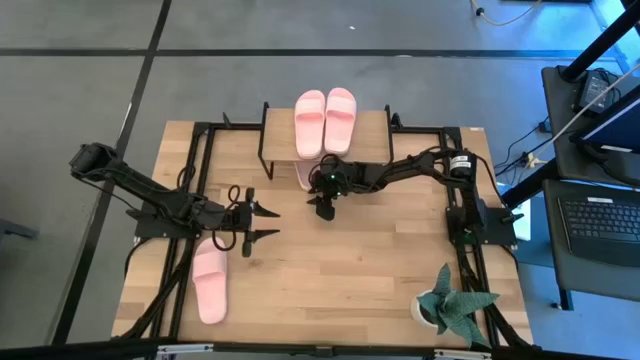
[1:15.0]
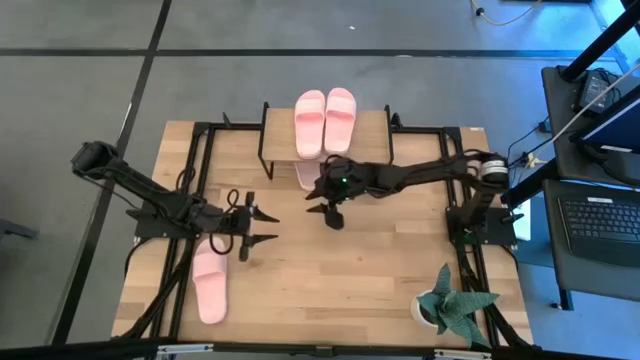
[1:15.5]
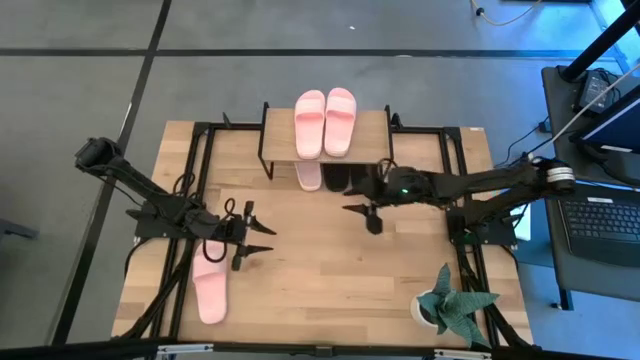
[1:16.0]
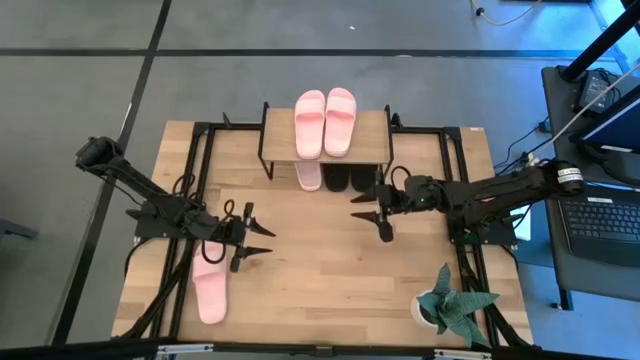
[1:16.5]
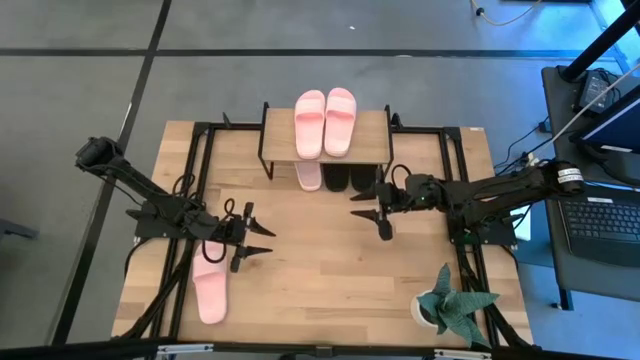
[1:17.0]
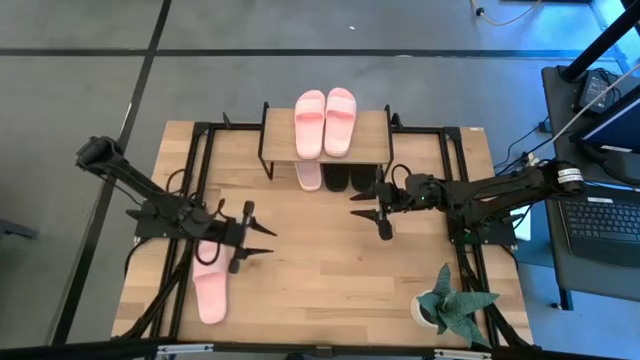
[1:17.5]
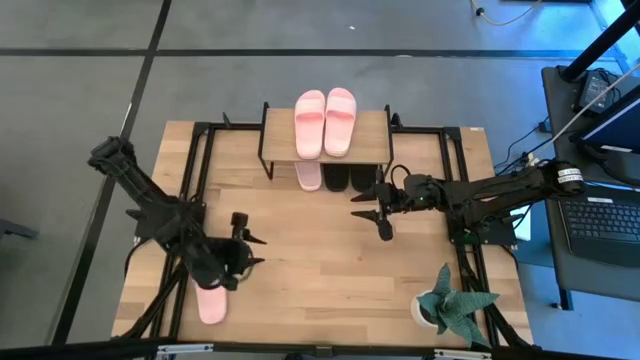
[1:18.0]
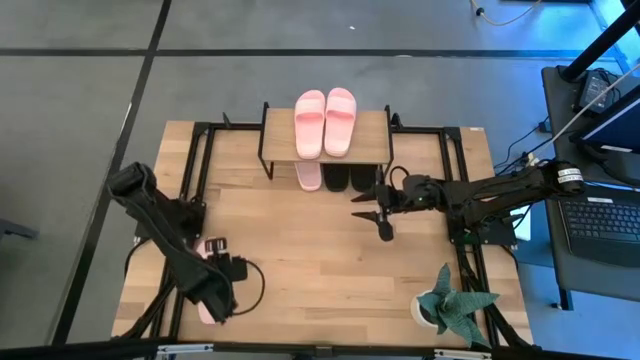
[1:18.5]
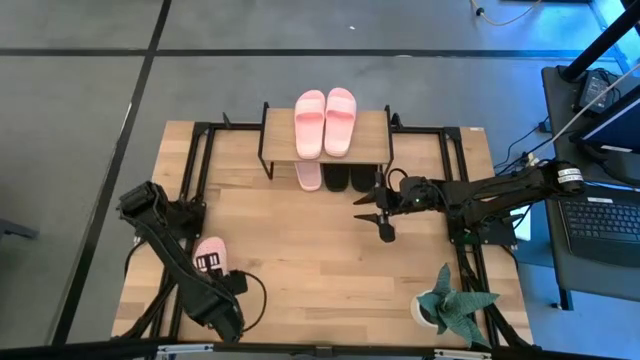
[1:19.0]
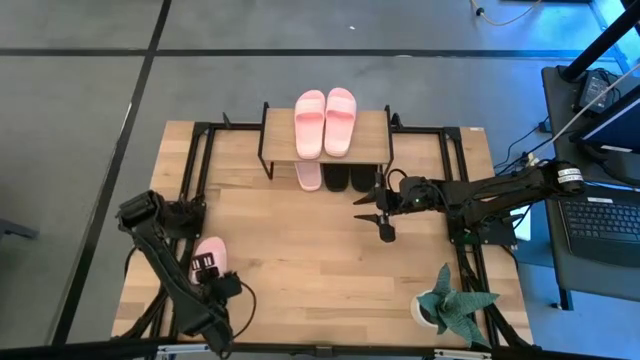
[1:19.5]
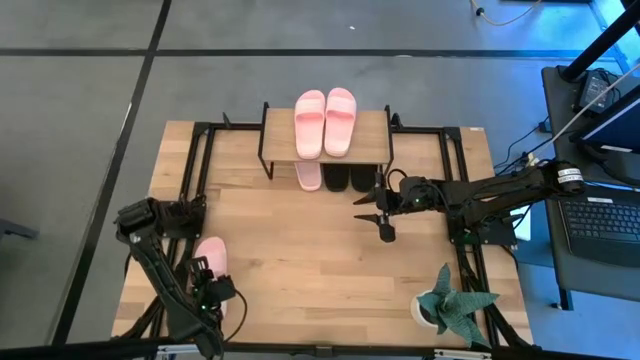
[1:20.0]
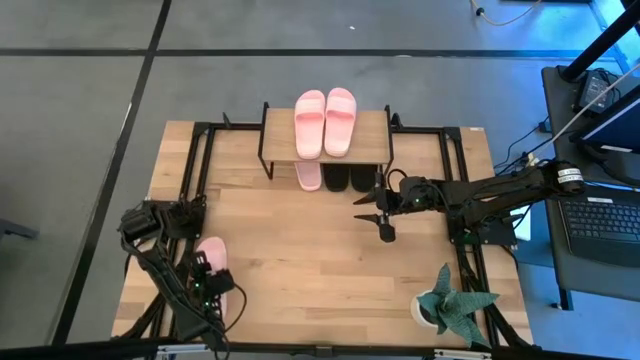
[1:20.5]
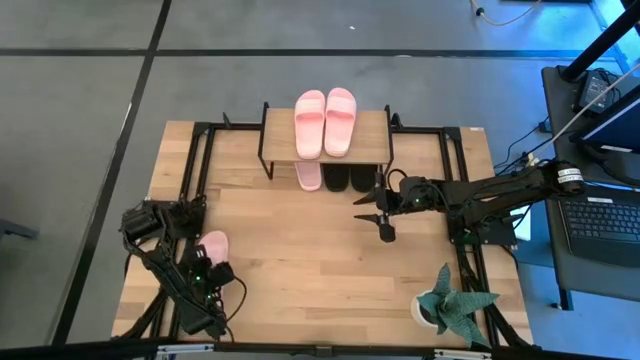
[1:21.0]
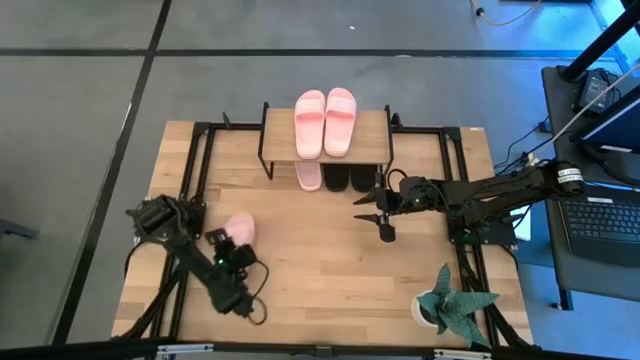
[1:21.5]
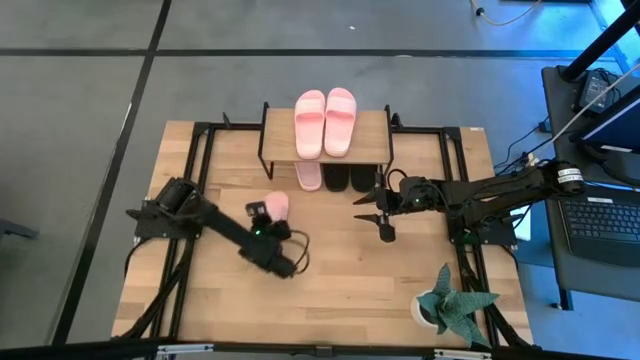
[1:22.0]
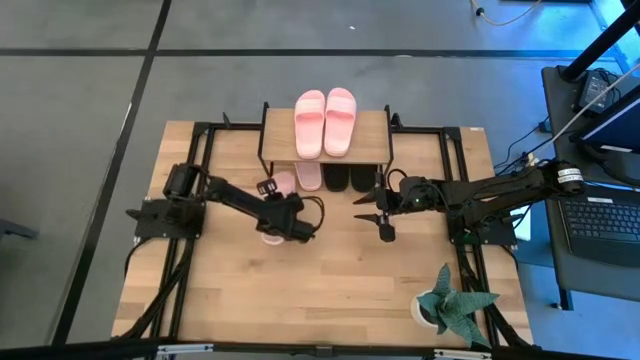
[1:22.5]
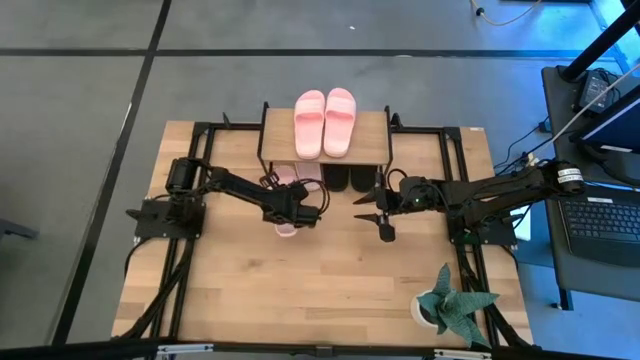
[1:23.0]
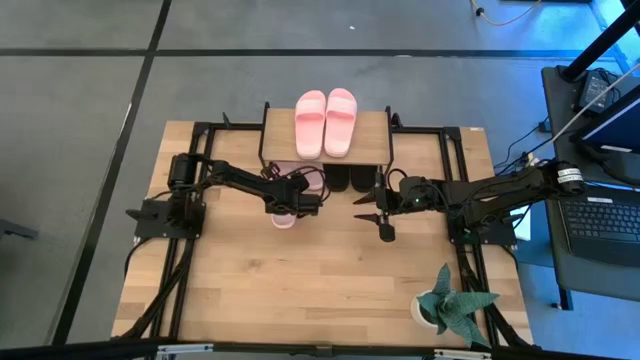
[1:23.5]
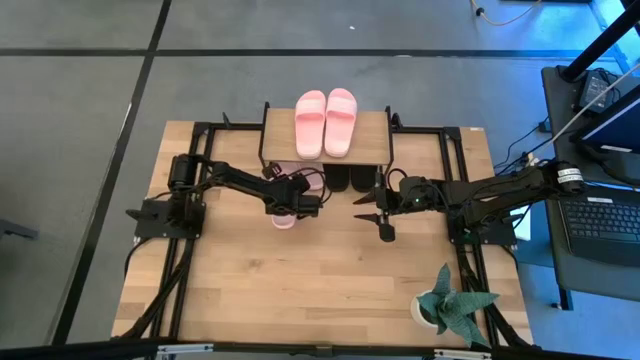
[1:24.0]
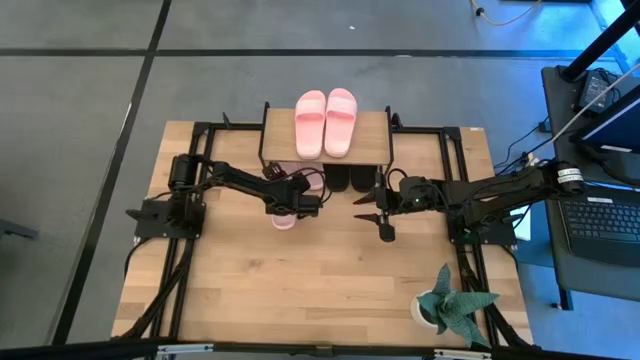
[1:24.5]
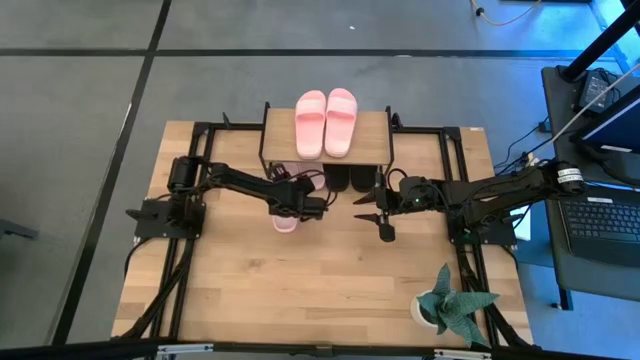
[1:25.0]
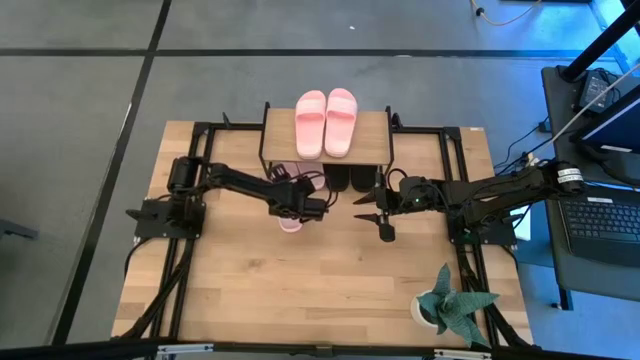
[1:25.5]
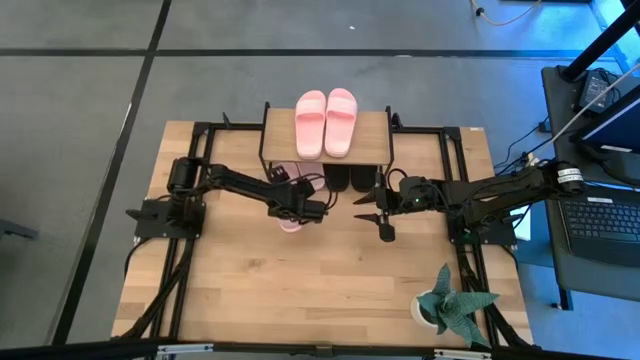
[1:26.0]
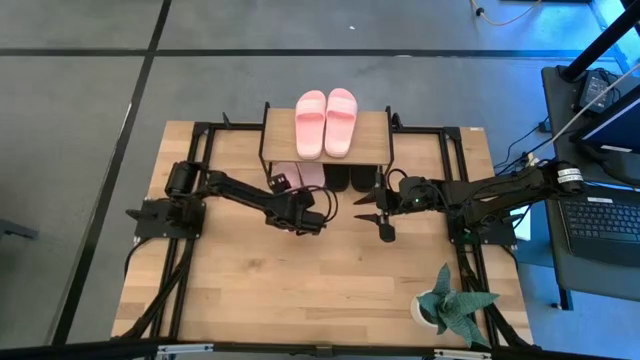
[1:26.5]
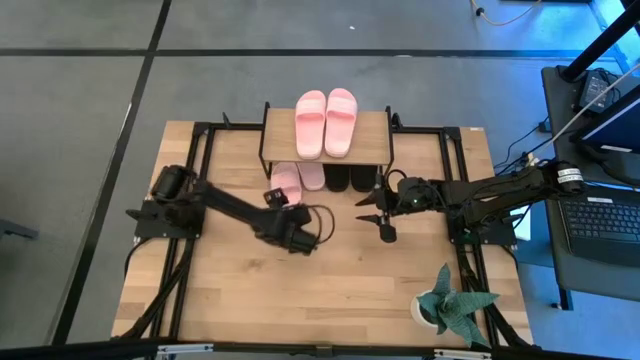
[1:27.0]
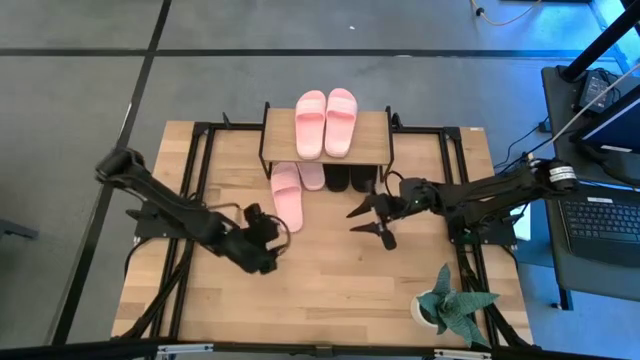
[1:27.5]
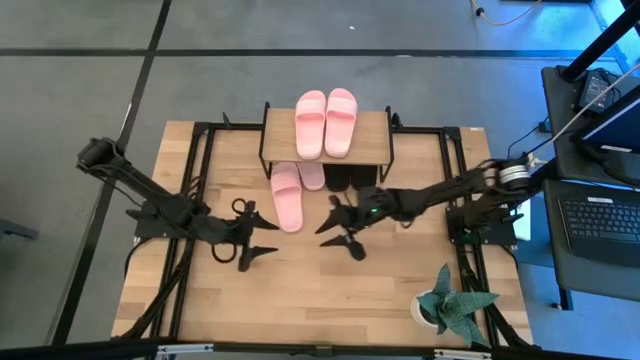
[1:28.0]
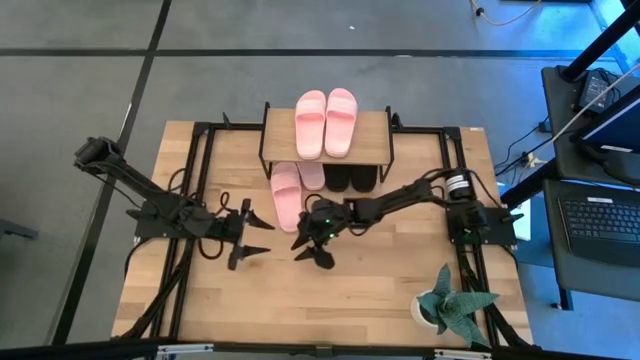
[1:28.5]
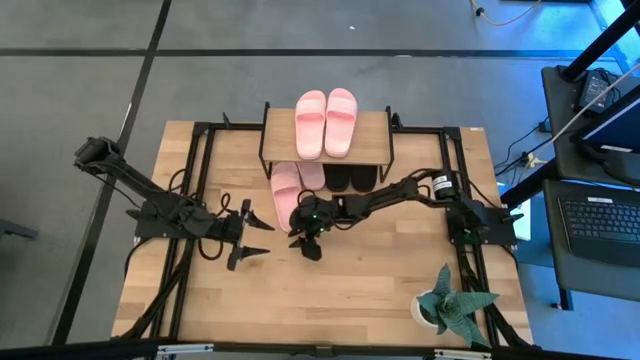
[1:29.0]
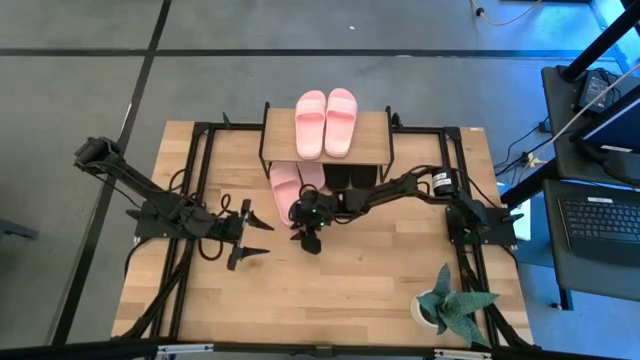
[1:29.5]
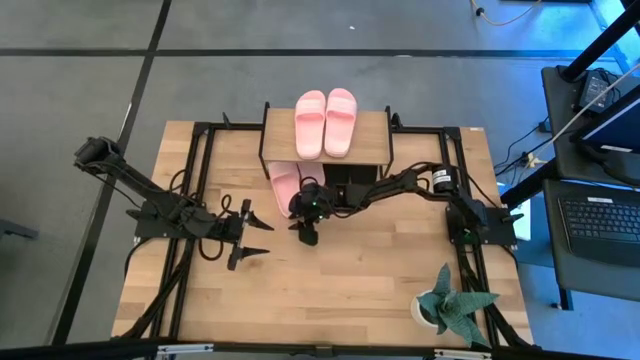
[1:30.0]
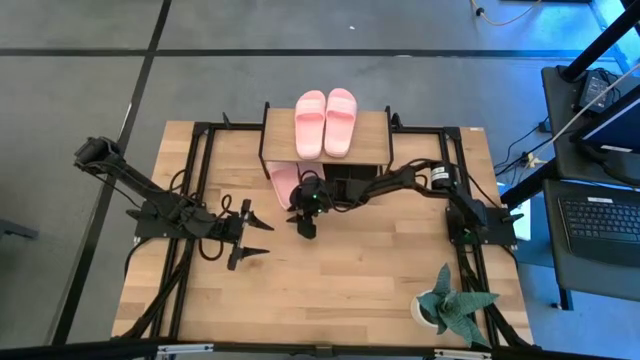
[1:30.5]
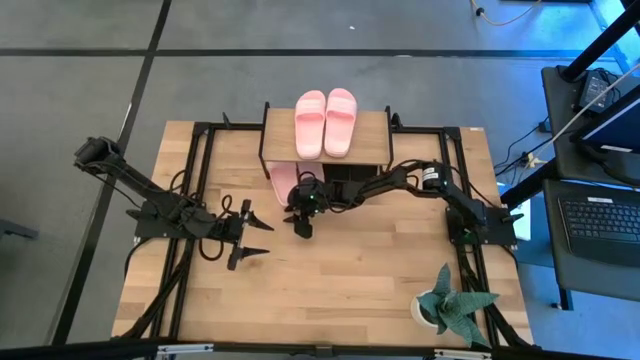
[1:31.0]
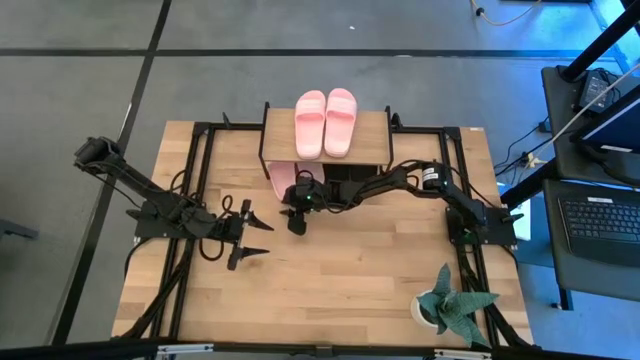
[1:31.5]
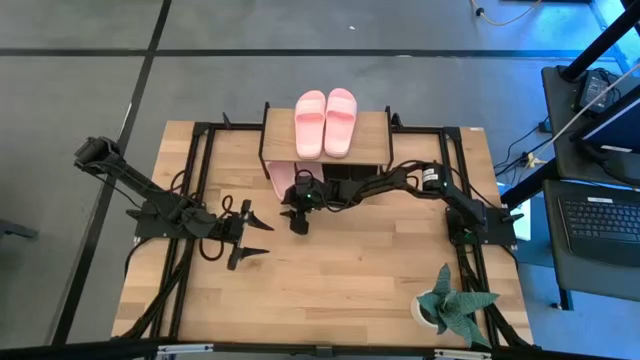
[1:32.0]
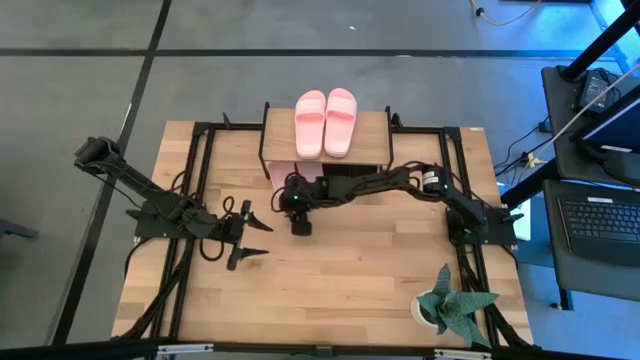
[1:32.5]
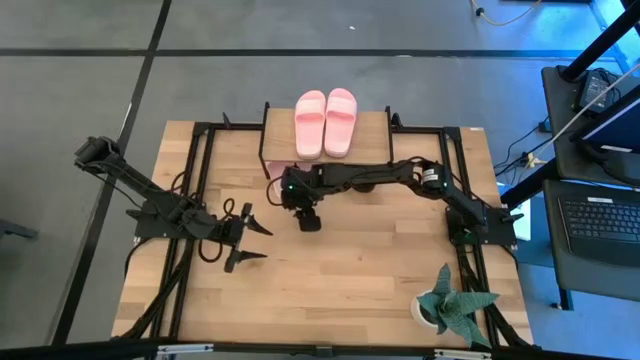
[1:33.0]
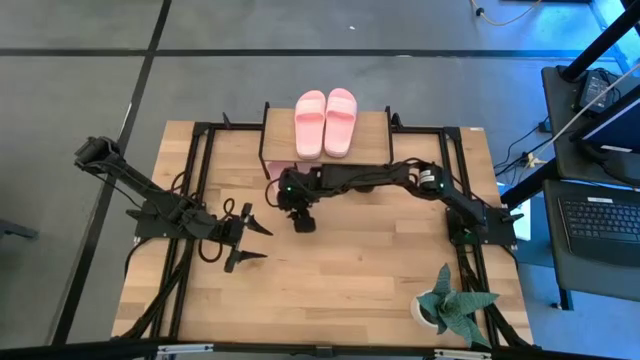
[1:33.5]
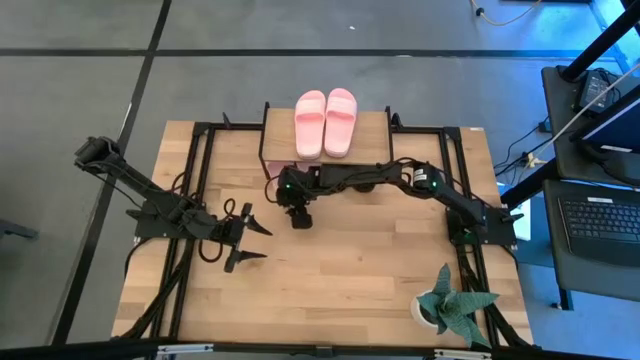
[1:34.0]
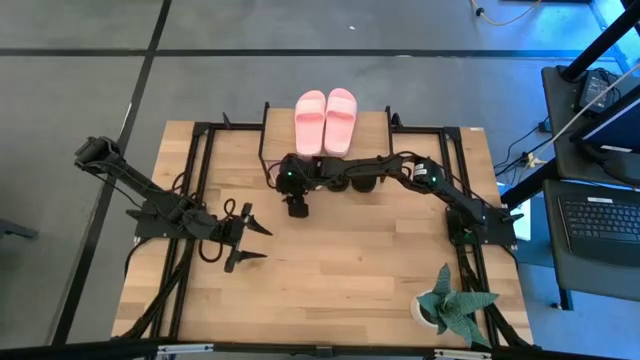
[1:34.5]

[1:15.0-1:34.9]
Task: Pick and place slides into the shelf
Put the pink slipper slide under the shelf

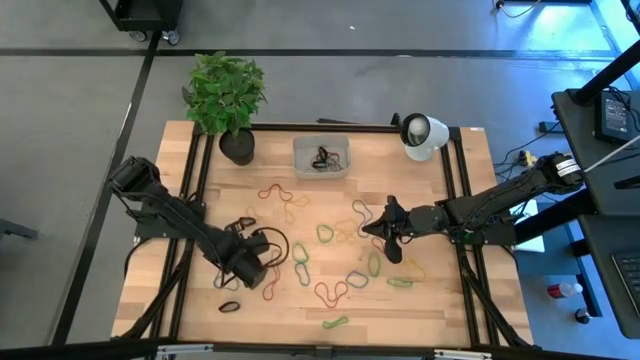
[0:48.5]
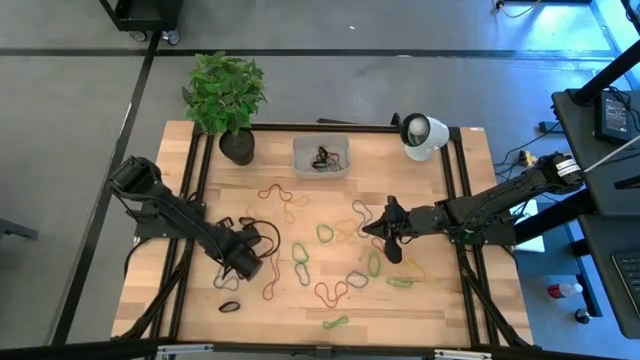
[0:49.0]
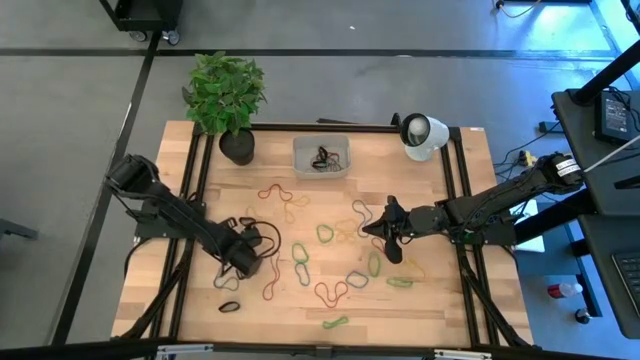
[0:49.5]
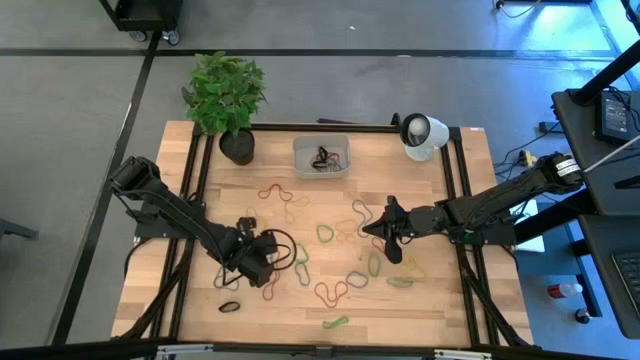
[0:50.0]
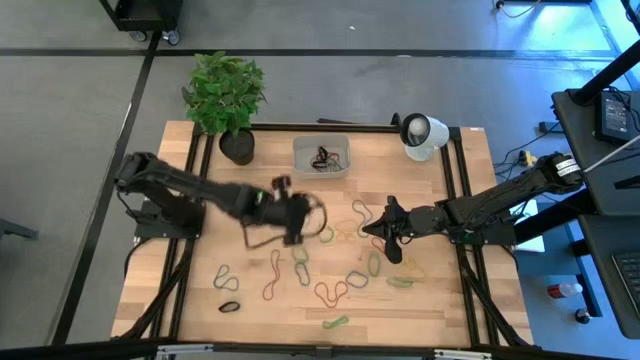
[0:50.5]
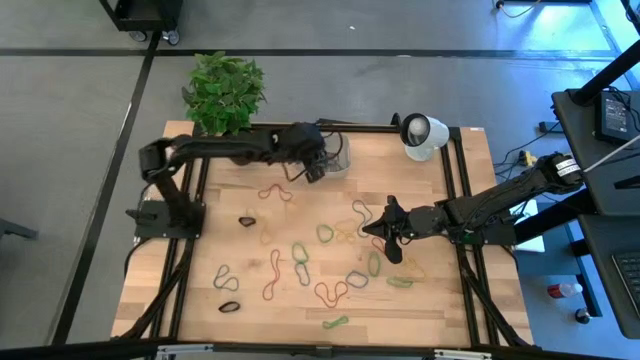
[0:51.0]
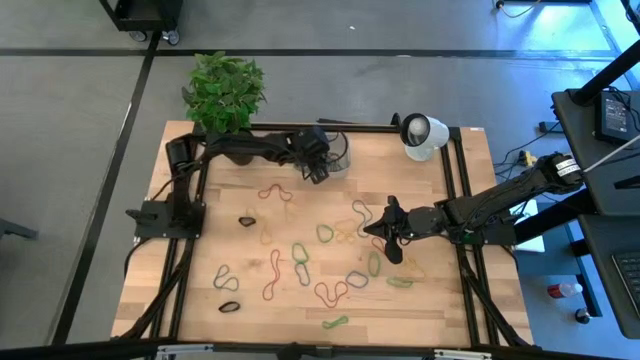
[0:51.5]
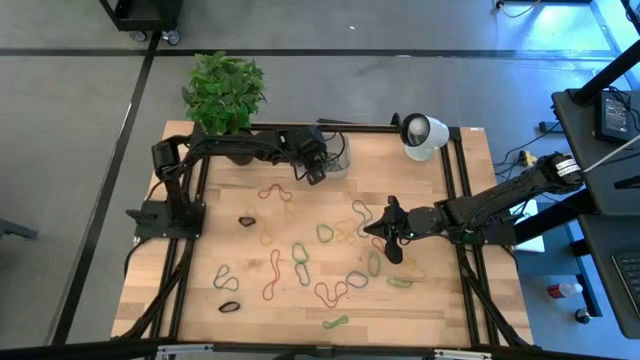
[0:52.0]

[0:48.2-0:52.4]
Task: Pick and place rubber bands into bin
Put the blue rubber band into the gray bin
